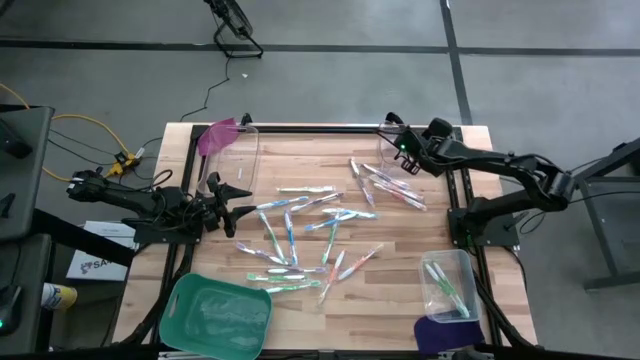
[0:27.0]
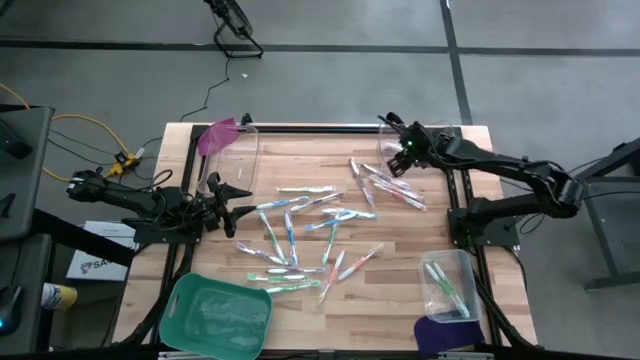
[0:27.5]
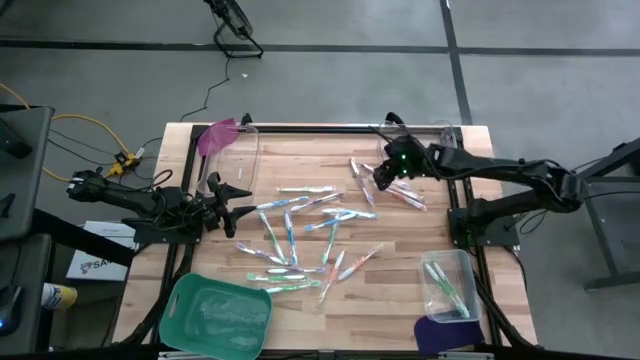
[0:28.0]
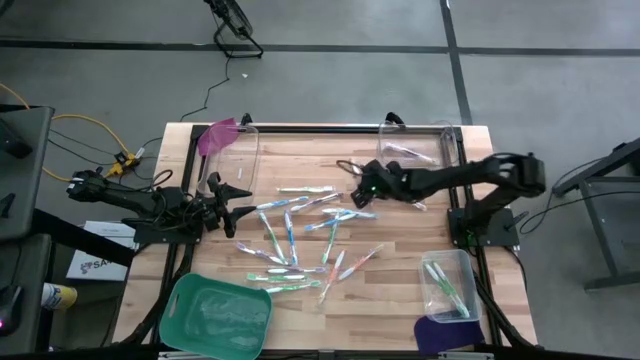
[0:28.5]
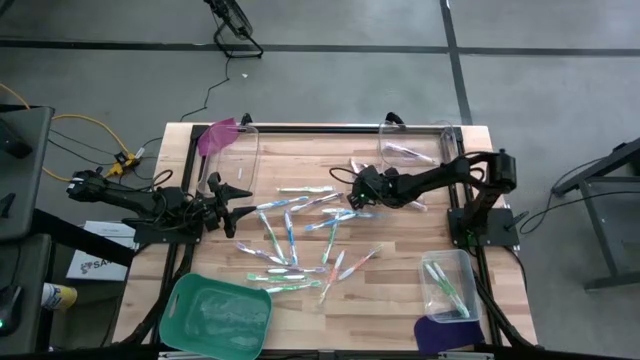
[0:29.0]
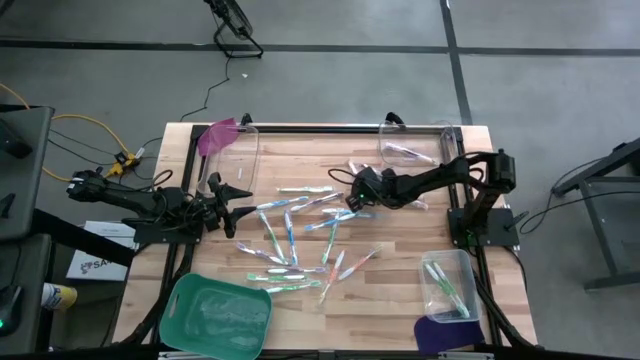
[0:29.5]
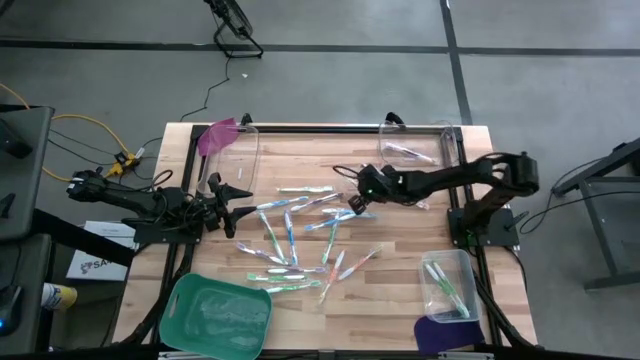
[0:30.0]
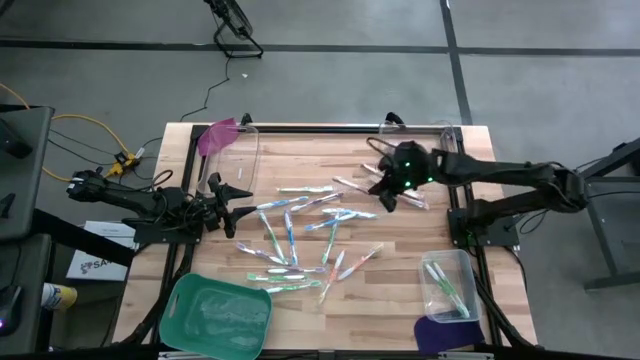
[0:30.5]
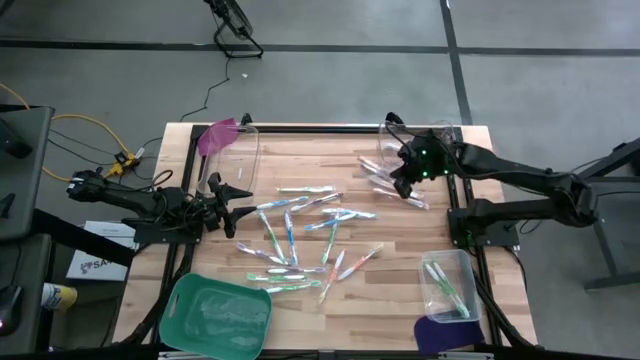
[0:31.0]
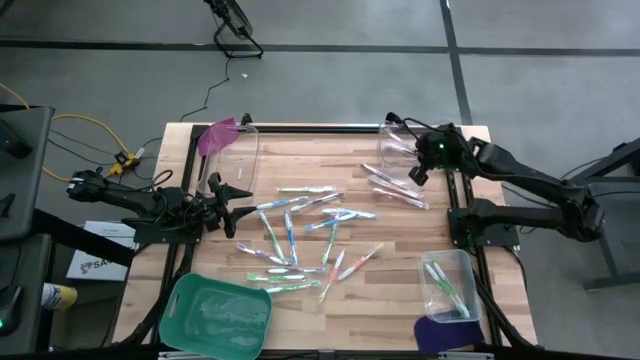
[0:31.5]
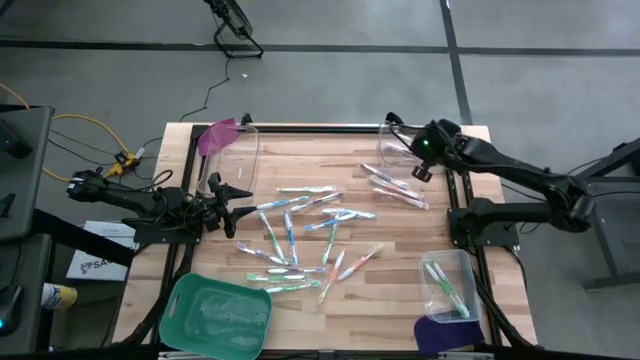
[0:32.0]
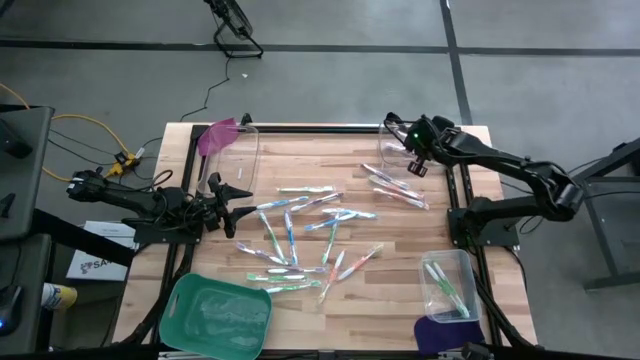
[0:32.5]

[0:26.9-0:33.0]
Task: Pick & Place Toothbrushes
Put the purple toothbrush into the right transparent bin

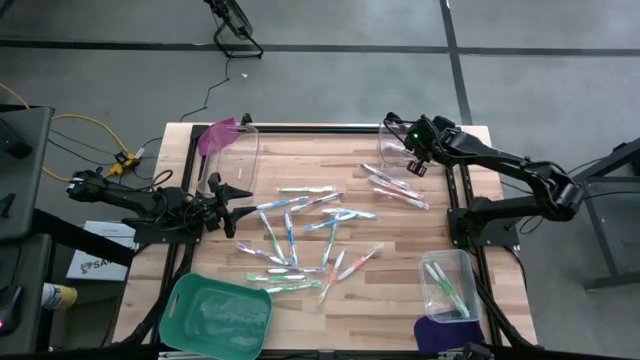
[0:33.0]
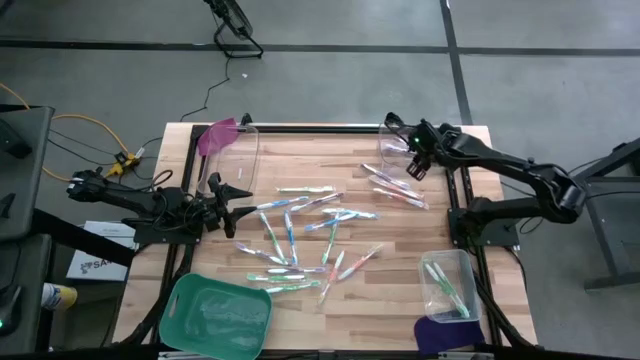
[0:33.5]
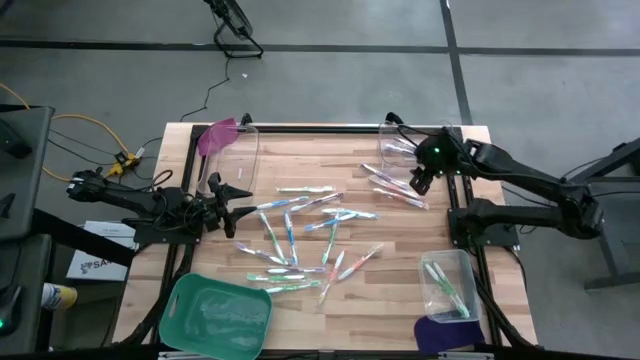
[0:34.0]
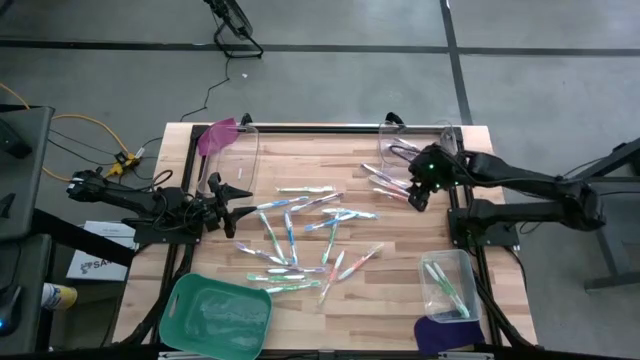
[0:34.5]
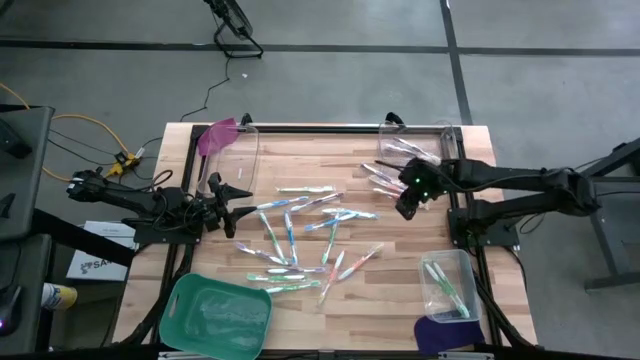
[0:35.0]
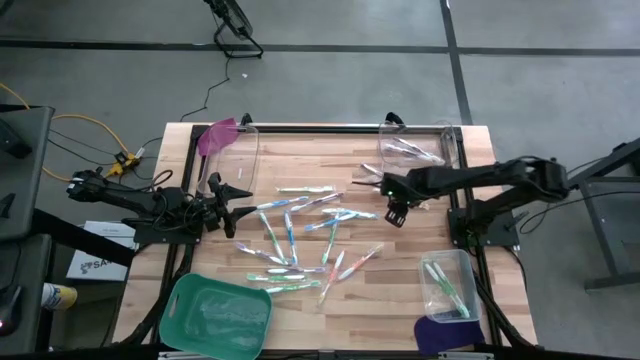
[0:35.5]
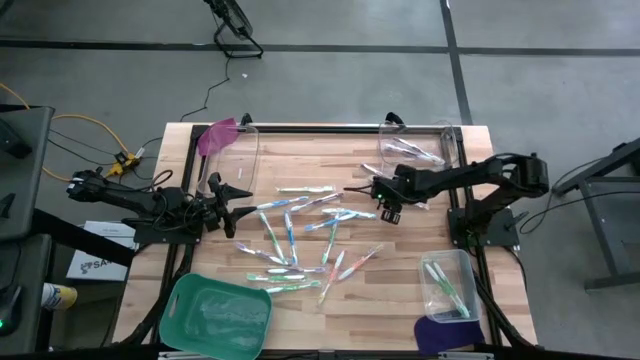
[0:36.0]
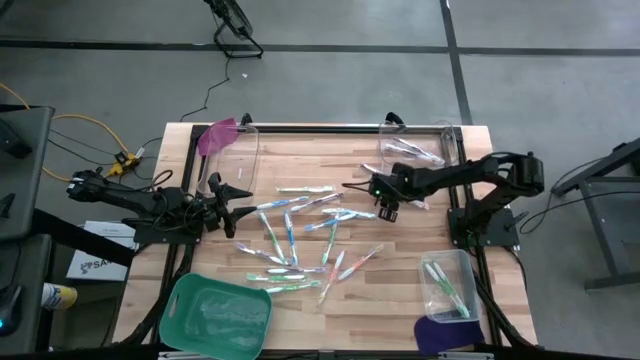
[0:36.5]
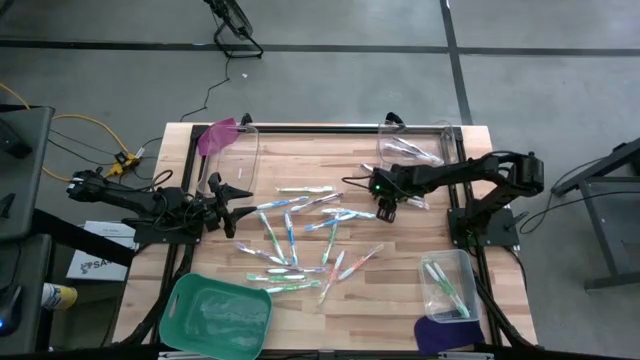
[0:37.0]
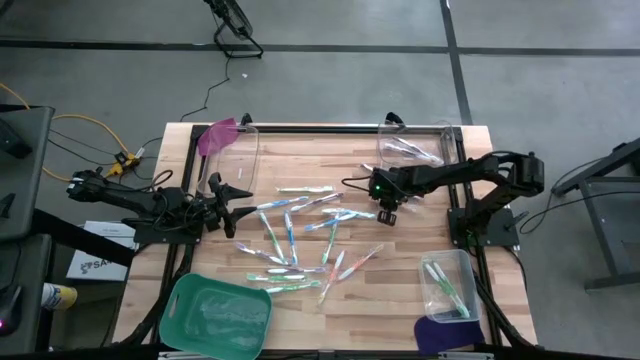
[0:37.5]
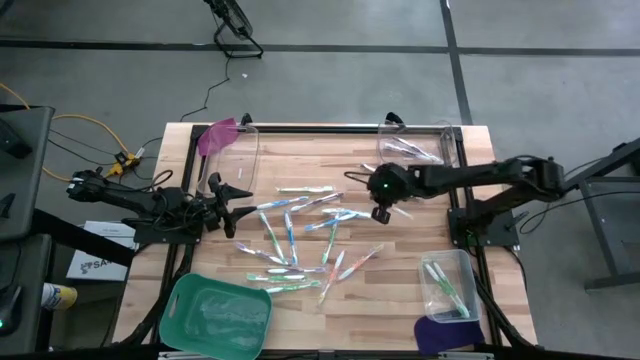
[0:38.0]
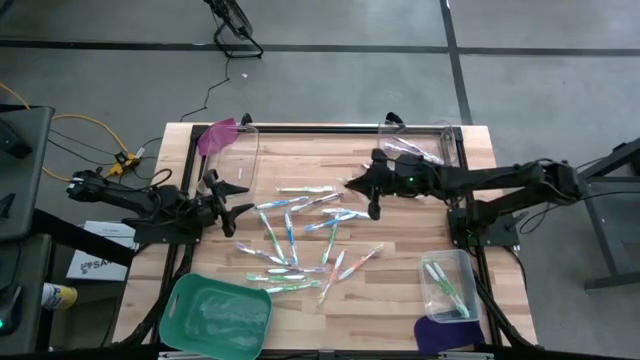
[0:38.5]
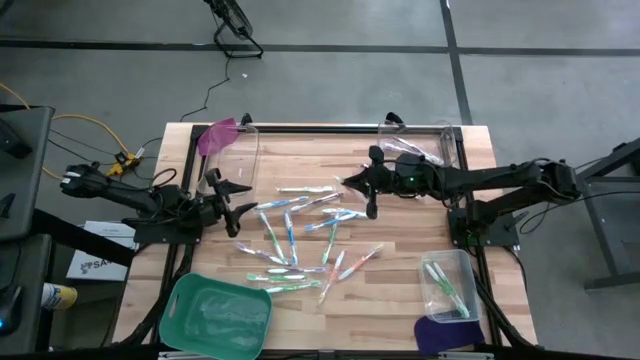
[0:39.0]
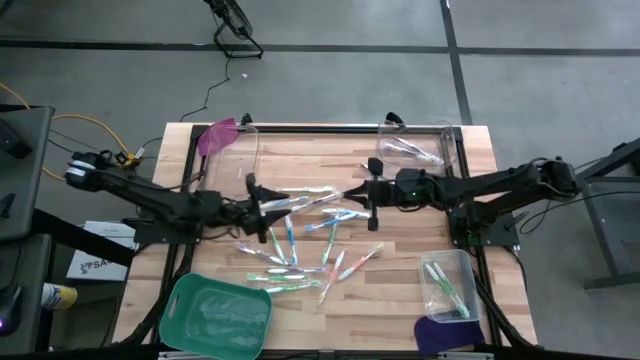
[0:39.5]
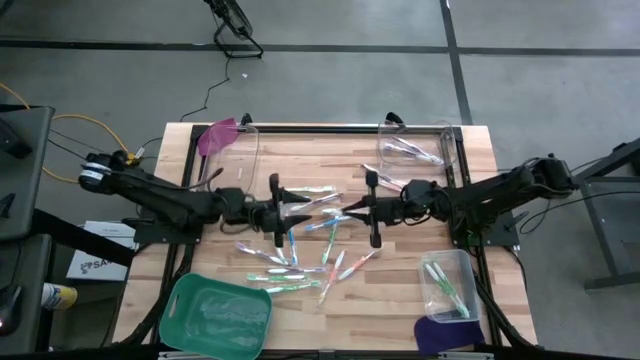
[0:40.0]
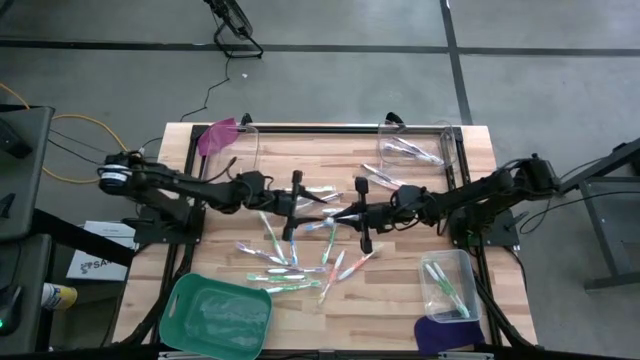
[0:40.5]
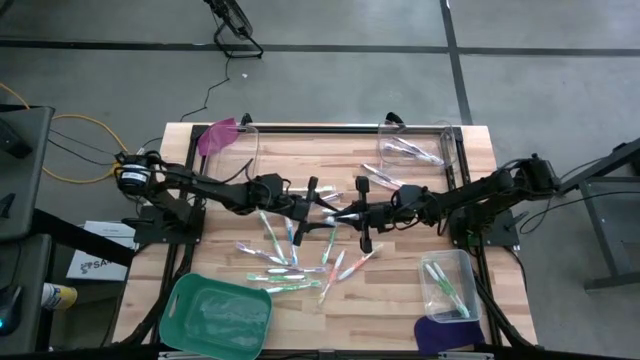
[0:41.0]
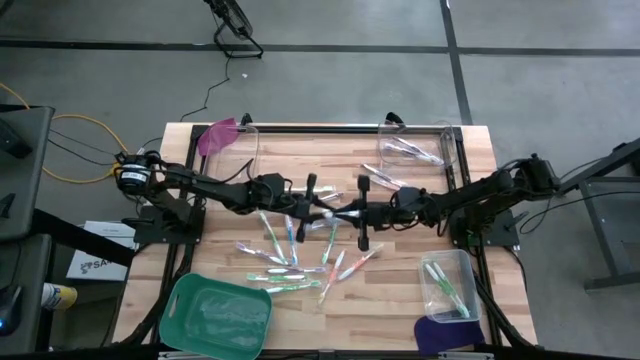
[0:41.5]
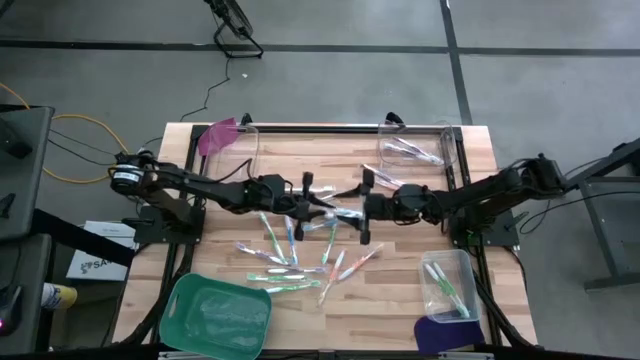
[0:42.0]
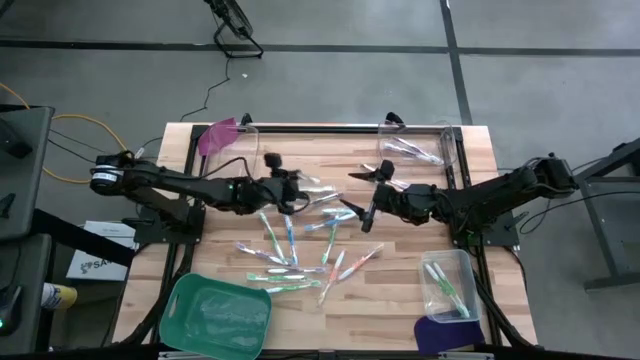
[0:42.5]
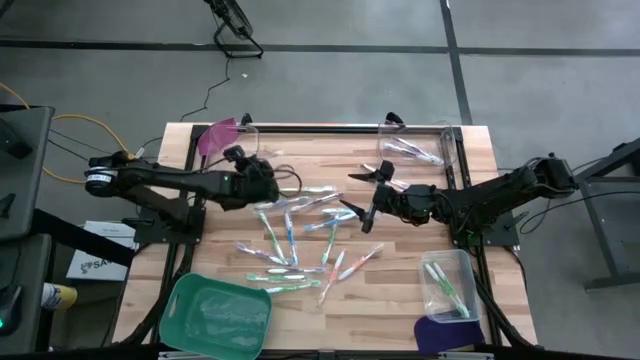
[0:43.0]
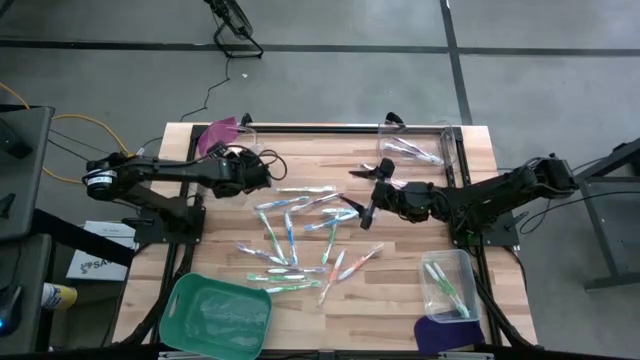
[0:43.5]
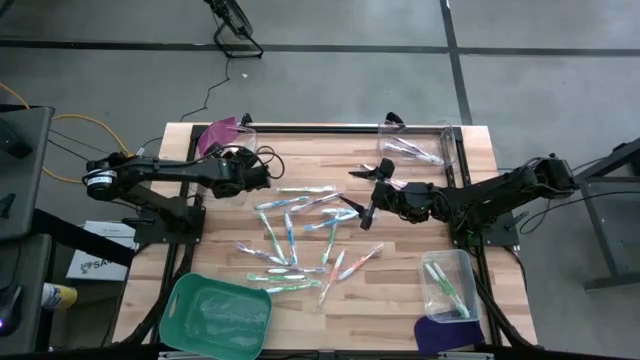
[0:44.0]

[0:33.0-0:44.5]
Put the orange toothbrush into the left transparent bin

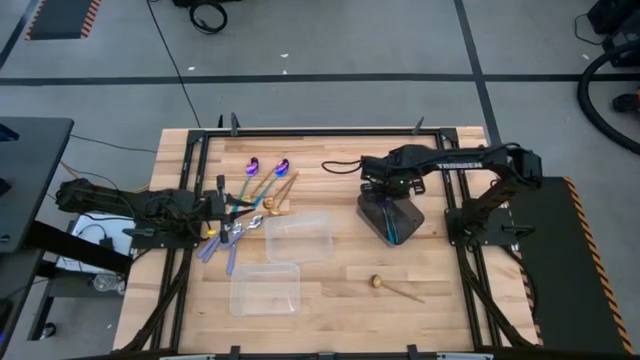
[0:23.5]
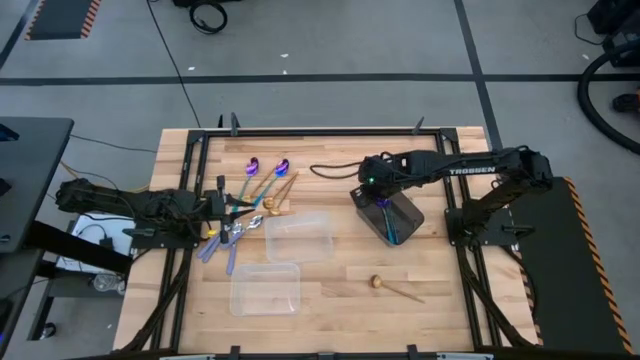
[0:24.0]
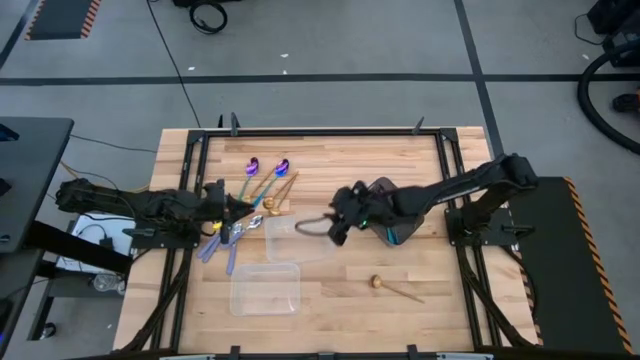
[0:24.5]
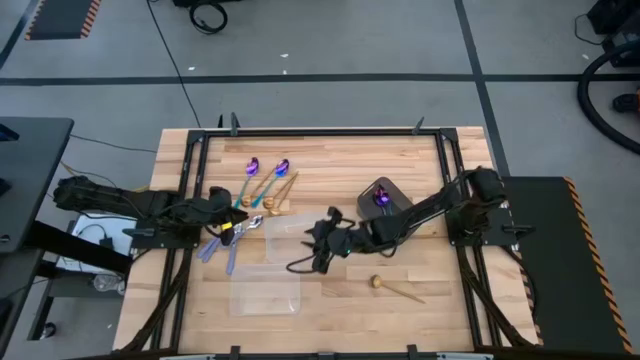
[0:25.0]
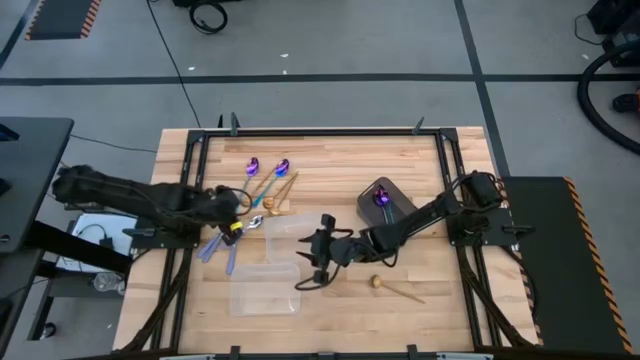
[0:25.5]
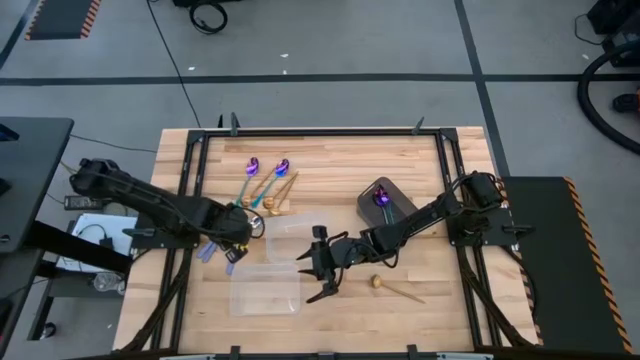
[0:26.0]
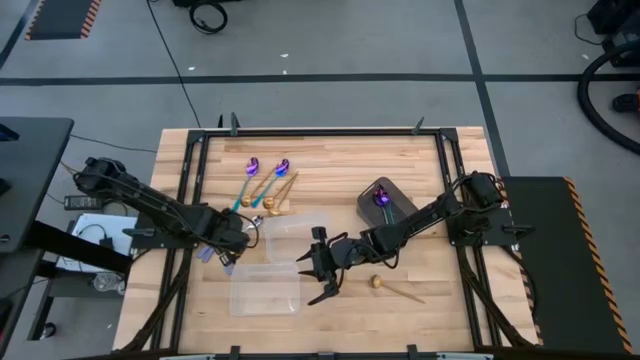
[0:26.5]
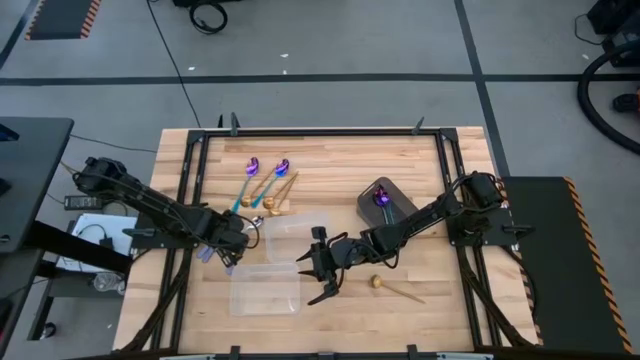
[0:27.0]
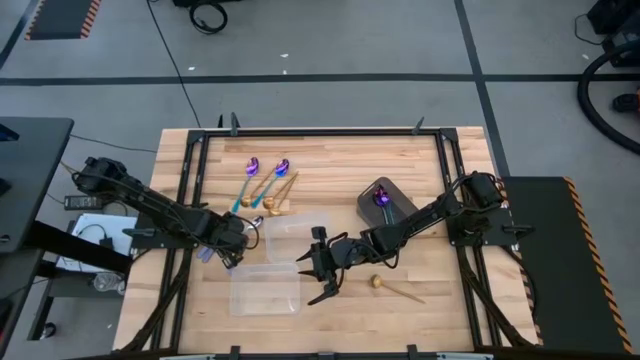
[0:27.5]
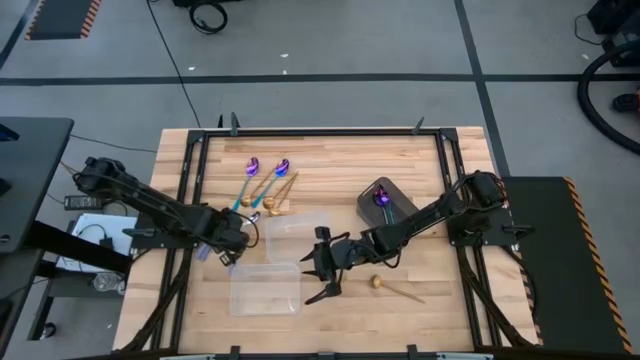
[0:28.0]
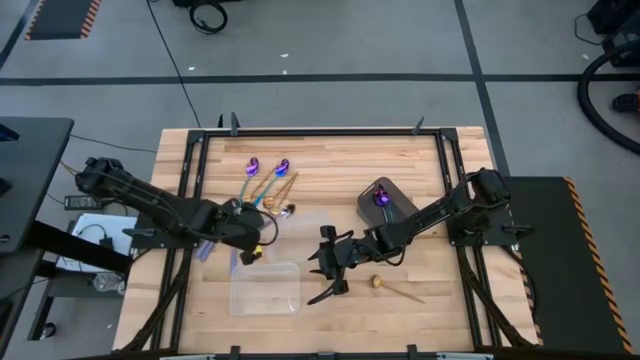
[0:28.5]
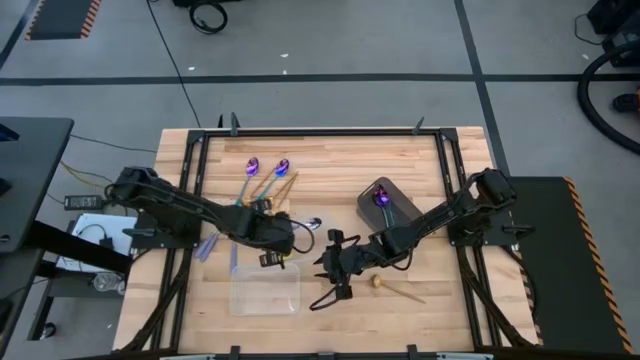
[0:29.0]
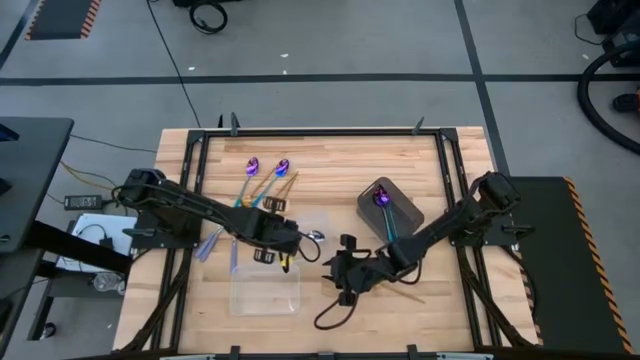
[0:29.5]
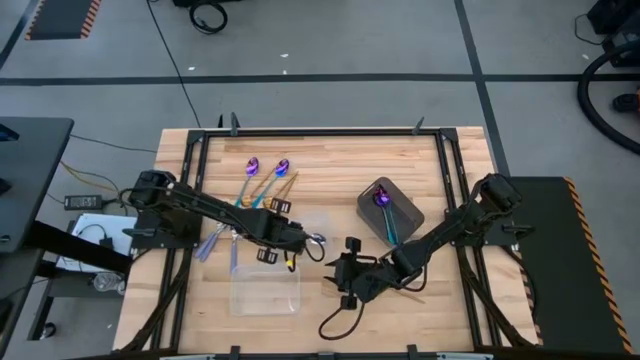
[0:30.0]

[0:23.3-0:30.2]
Task: Sort silverware by color (type)
Put the violet spoon into the top transparent bin
